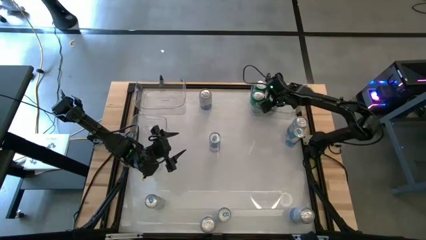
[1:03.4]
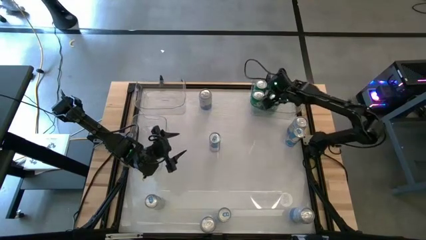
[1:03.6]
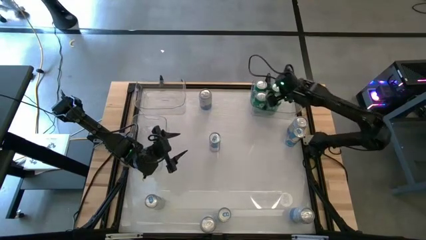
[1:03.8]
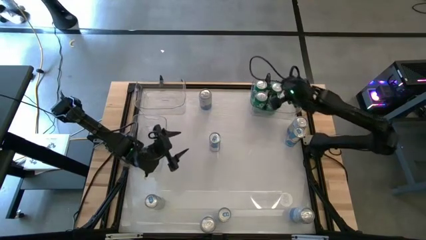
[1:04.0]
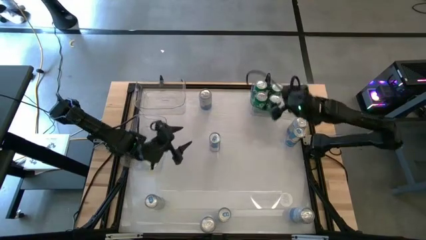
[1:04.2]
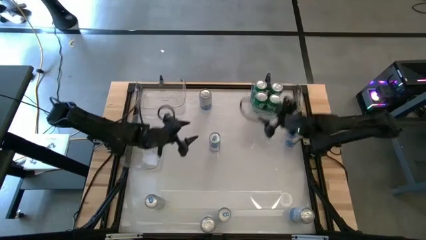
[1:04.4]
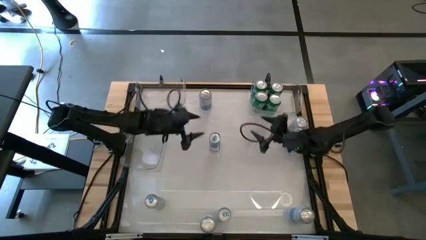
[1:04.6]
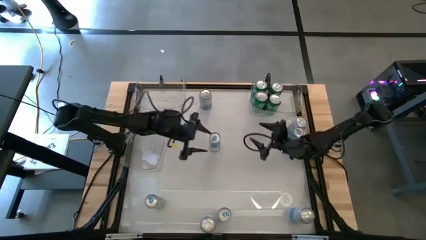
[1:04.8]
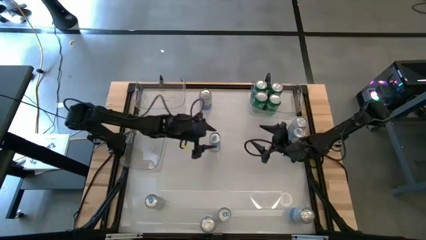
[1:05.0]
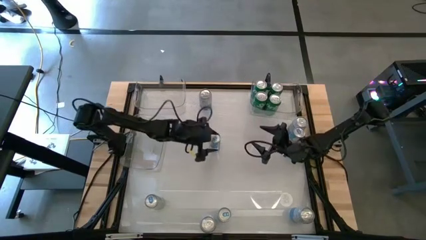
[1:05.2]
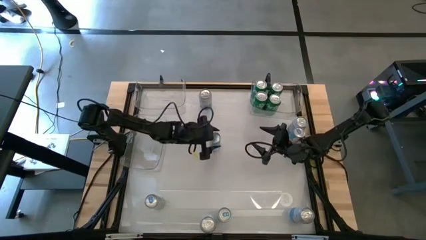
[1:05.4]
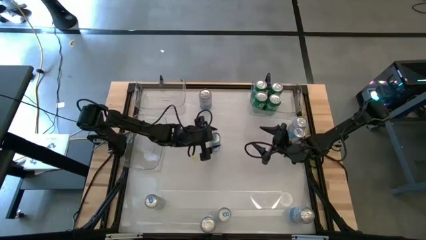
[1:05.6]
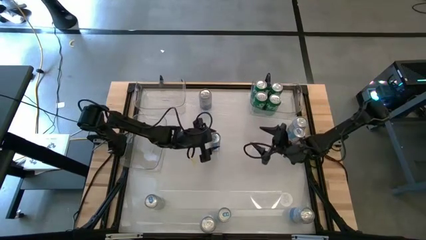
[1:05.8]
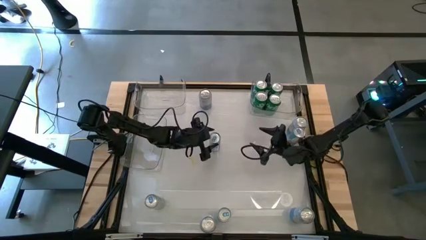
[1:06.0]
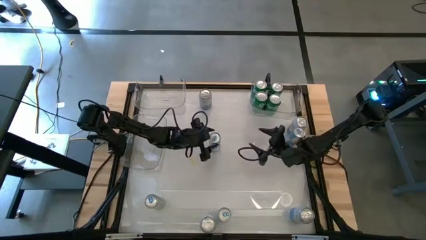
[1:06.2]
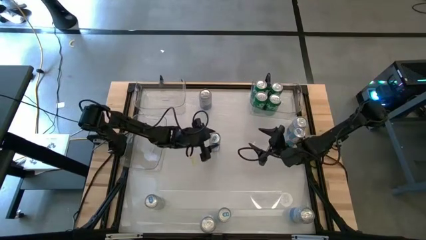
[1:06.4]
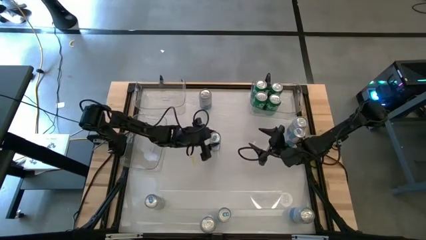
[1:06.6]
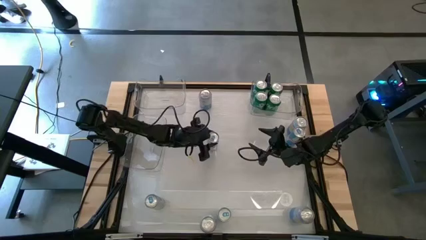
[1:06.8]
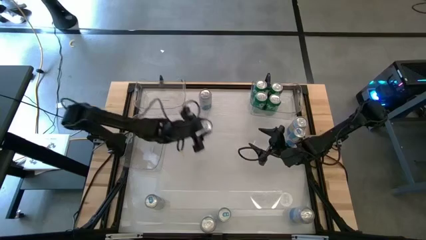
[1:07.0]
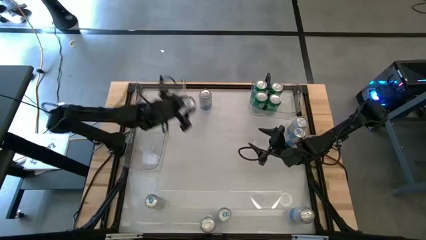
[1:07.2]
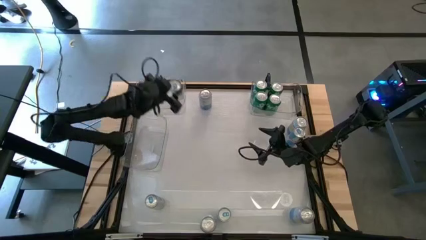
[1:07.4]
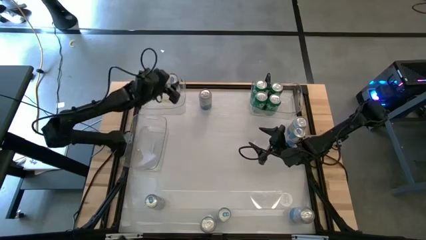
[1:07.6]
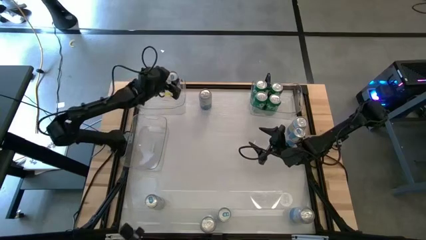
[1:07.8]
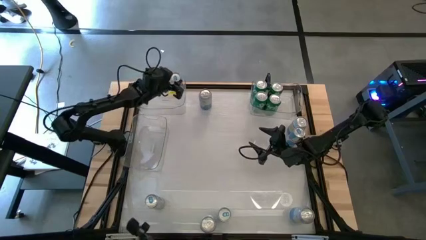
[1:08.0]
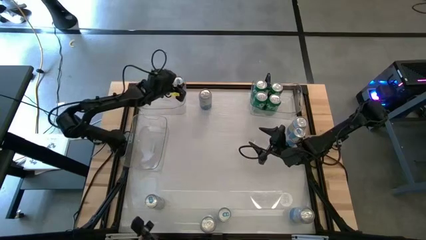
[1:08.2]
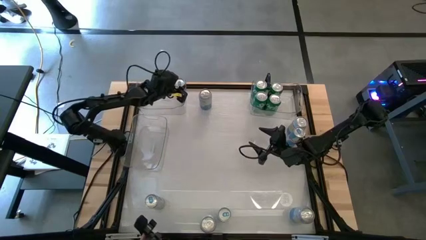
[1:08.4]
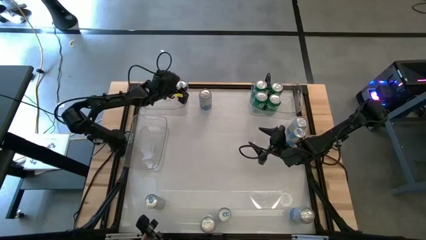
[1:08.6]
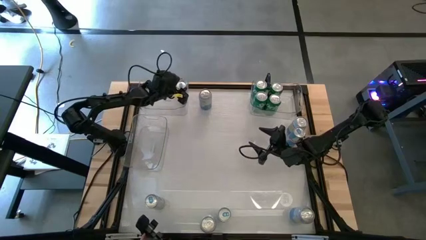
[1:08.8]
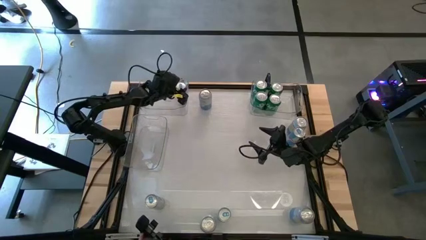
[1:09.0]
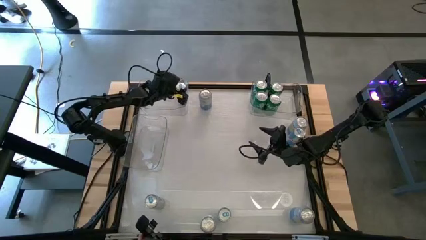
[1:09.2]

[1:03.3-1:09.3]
Task: Sort soda cans
Put the center blue soda can into the top left transparent bin

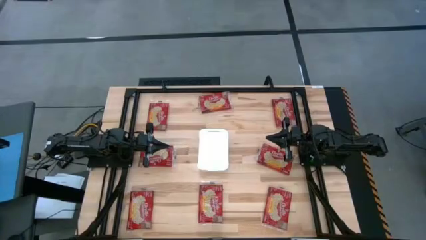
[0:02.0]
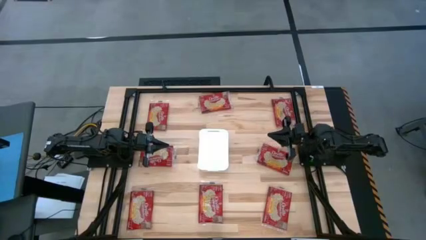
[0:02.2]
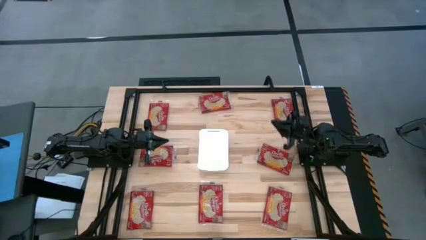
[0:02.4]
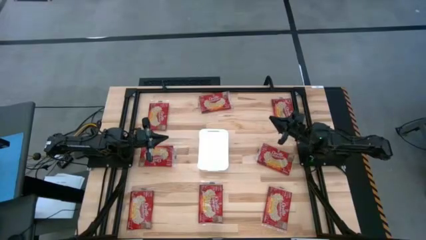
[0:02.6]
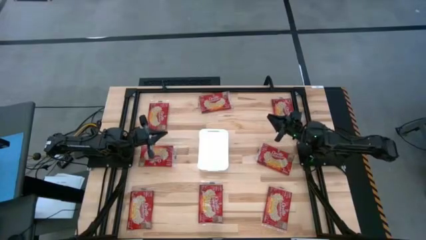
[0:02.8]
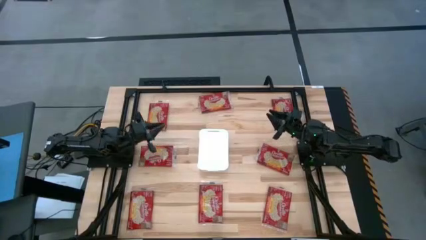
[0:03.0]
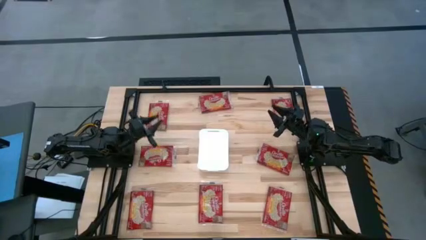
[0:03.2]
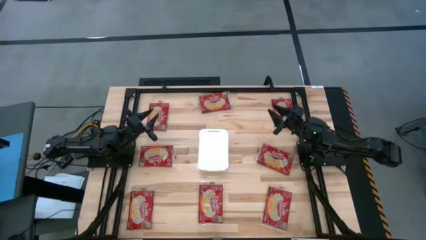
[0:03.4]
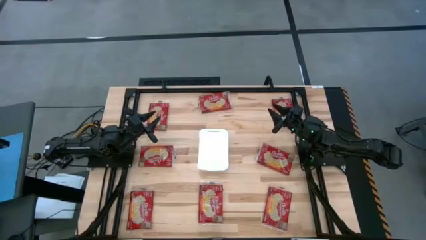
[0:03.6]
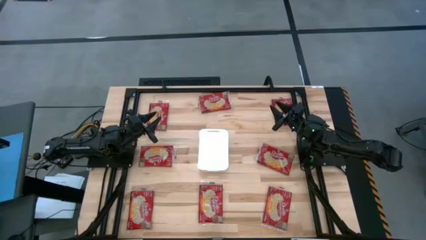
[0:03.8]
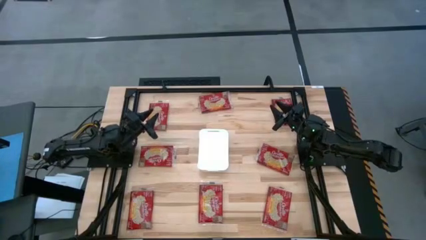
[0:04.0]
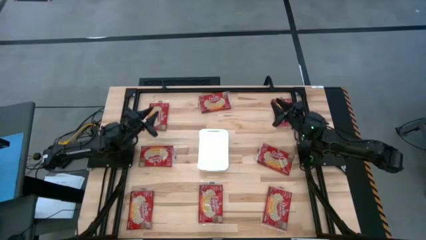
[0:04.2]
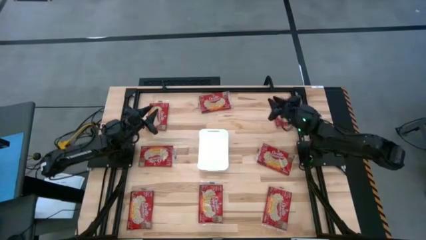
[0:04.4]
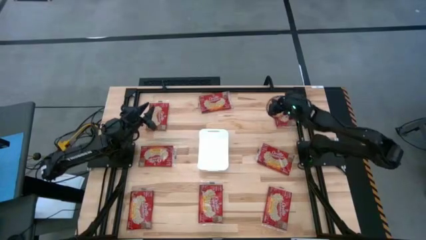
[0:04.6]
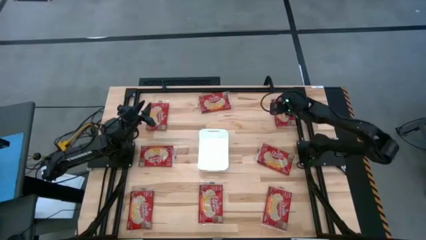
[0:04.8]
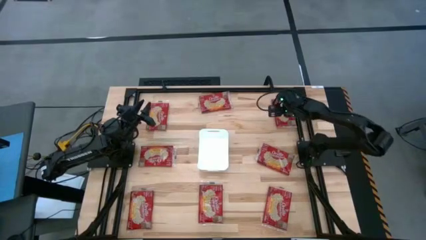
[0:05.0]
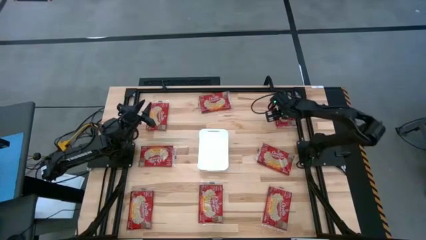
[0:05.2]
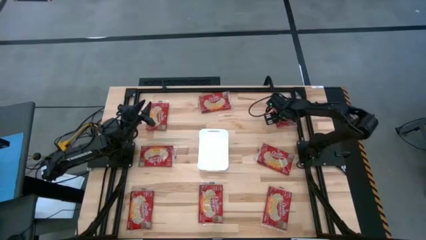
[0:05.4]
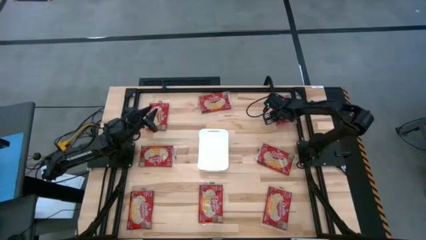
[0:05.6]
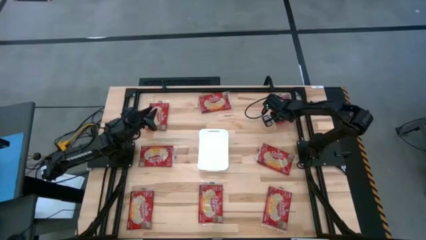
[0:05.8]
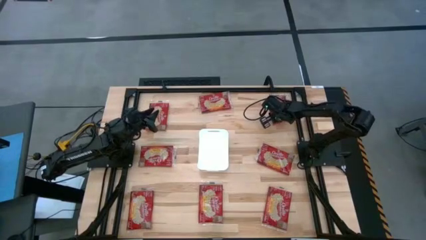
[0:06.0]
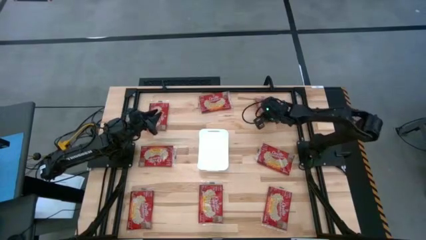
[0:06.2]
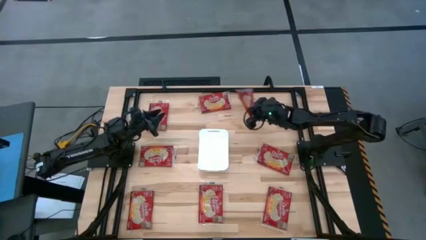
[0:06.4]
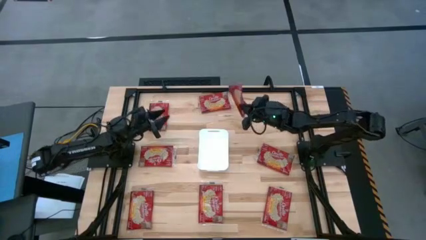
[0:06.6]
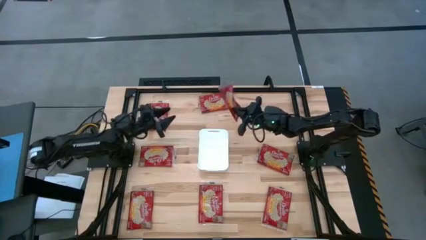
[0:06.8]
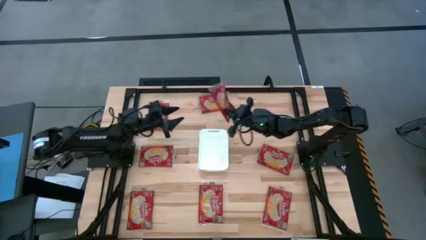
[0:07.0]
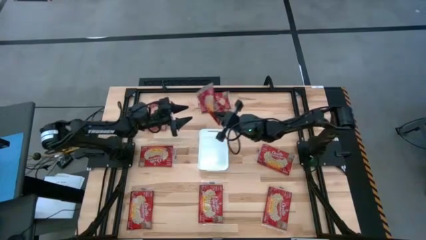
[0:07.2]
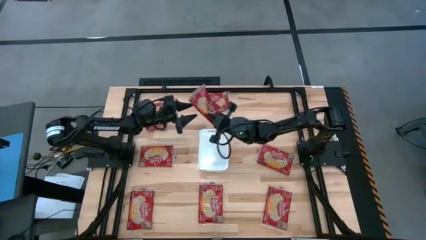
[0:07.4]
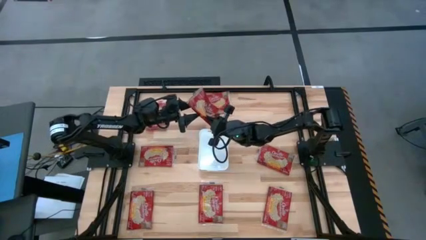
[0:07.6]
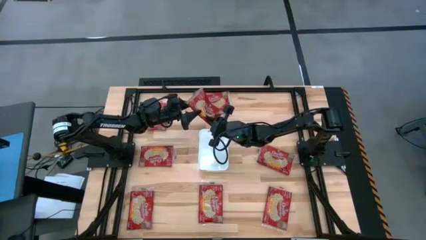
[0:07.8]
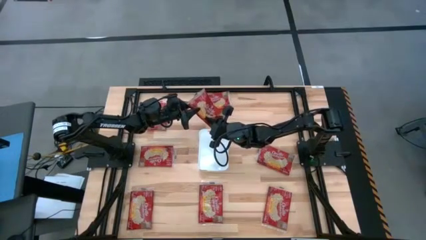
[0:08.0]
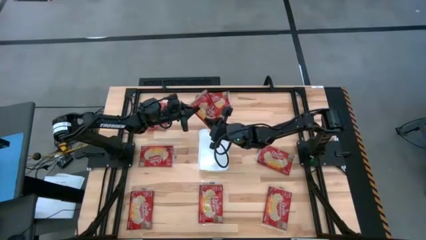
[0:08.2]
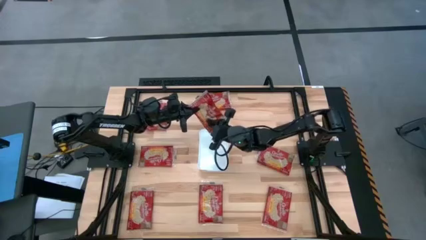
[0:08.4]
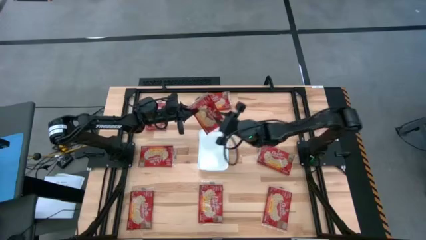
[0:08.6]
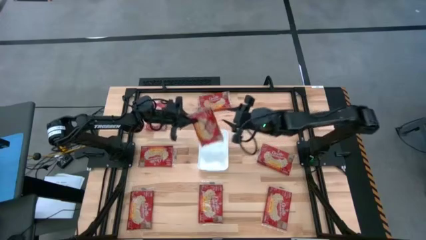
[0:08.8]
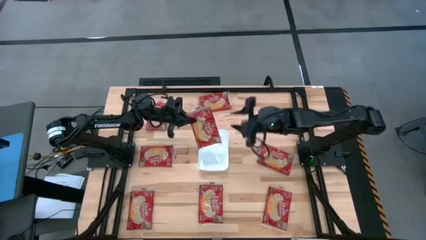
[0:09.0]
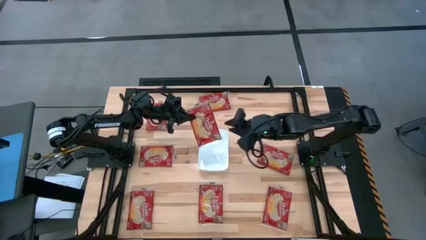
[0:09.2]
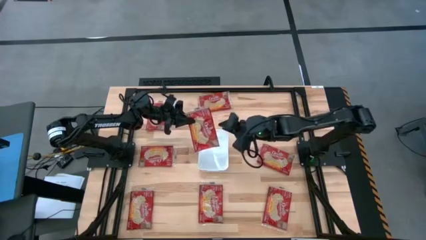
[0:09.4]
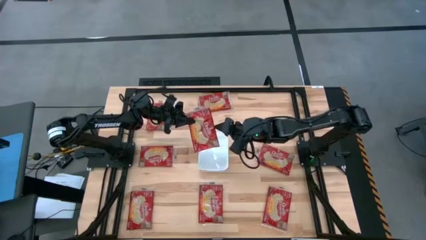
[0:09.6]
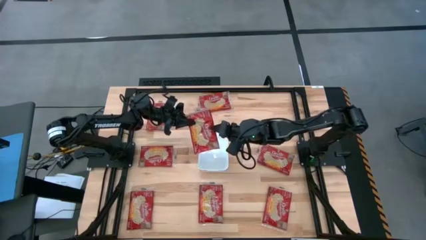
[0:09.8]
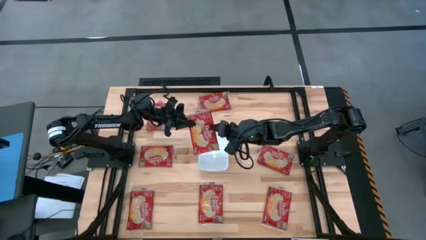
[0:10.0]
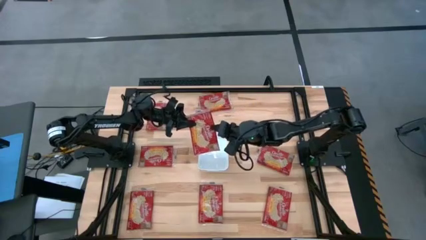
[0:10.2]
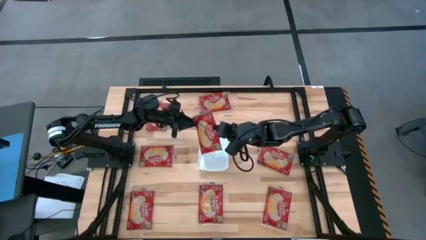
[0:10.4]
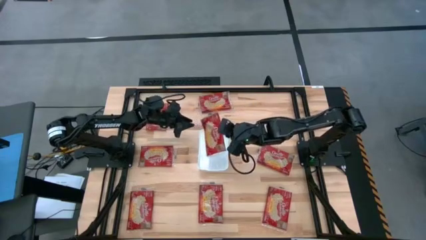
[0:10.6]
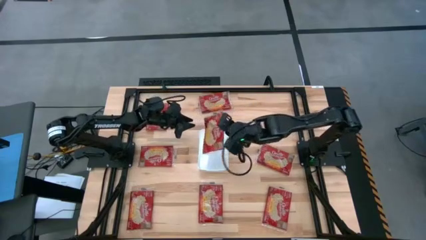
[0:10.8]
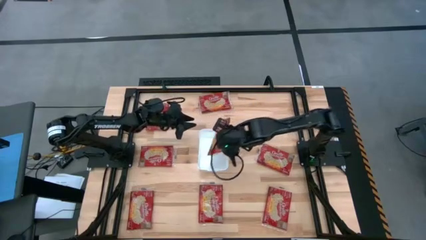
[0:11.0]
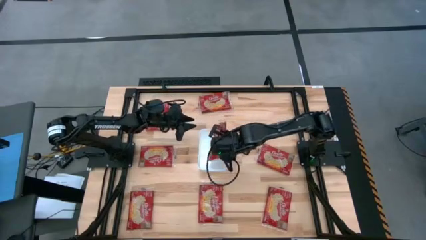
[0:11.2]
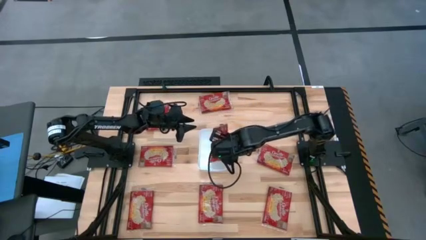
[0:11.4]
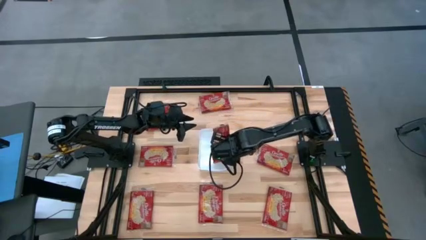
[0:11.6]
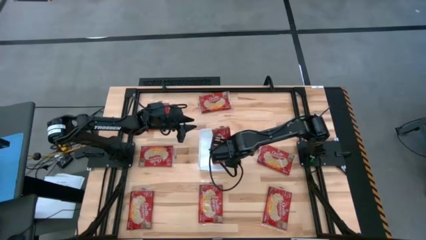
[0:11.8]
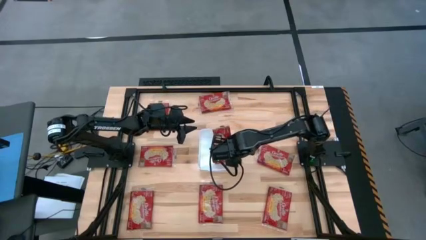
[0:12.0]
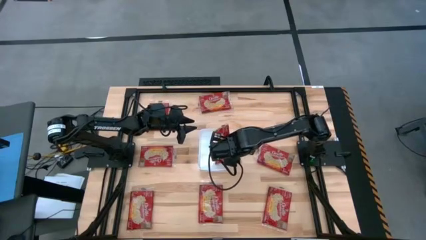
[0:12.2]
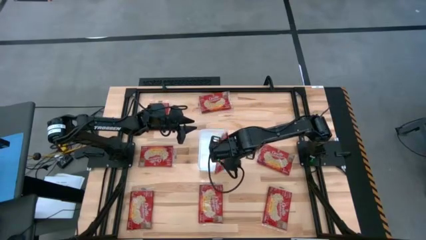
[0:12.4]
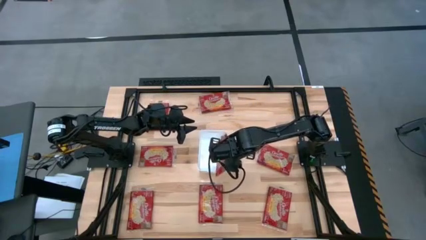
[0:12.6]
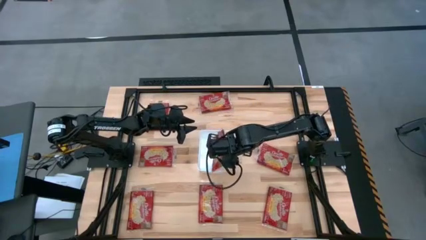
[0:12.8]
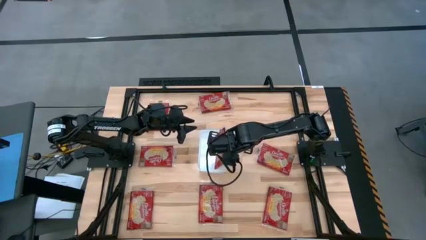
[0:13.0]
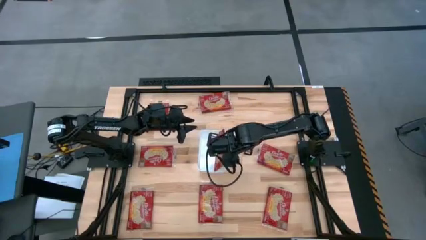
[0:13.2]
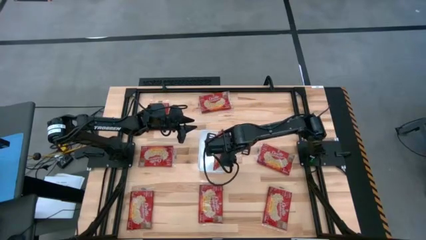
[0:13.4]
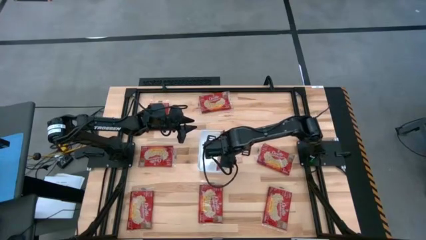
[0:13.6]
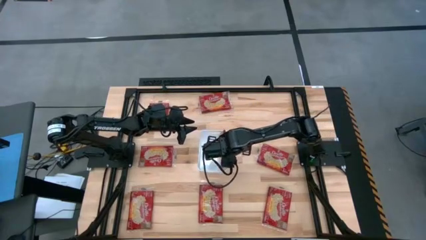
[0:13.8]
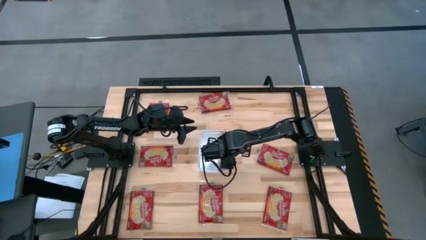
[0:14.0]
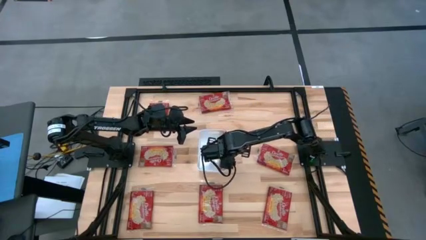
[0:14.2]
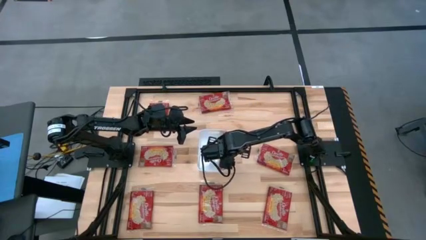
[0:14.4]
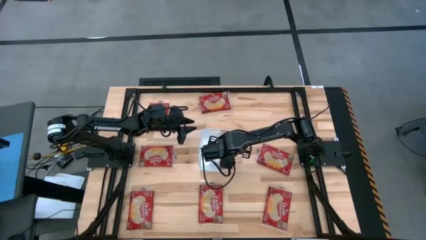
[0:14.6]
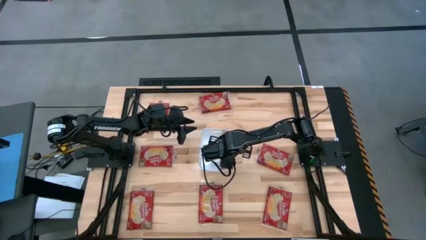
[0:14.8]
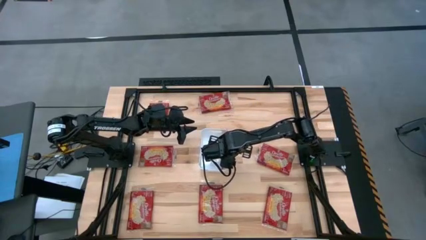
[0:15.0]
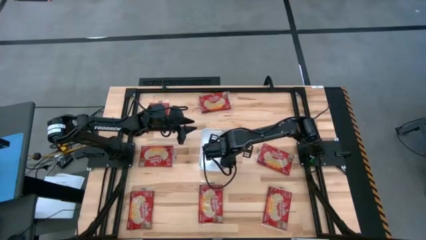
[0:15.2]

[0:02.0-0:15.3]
Task: Sort popcorn bags into baskets
Put the red popcorn bag into the white bin
